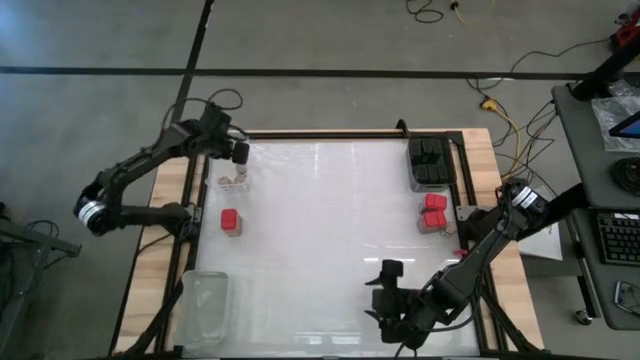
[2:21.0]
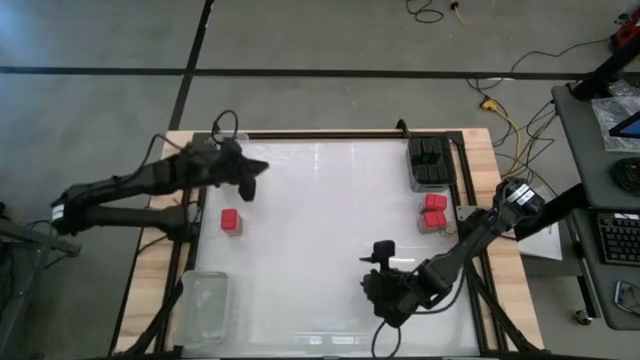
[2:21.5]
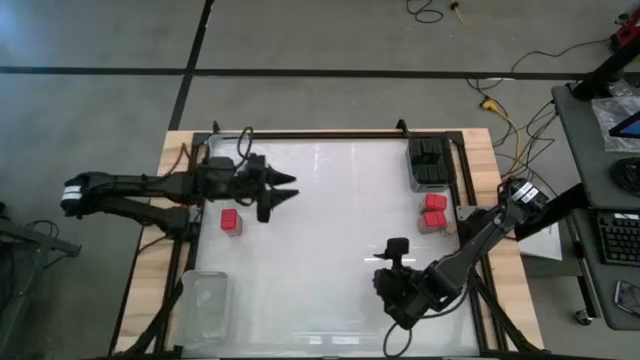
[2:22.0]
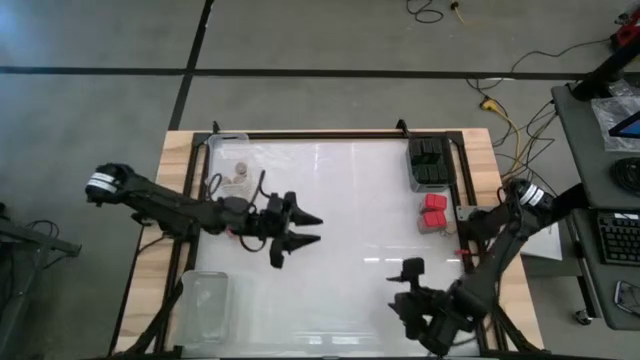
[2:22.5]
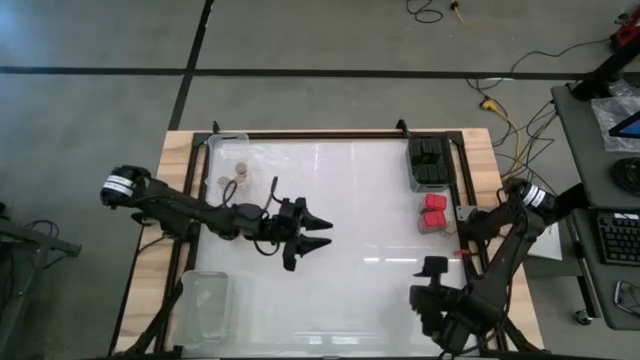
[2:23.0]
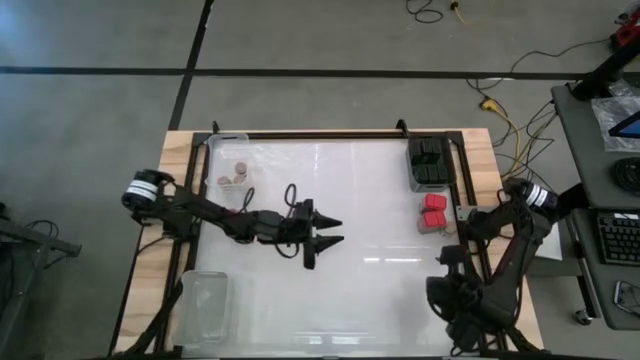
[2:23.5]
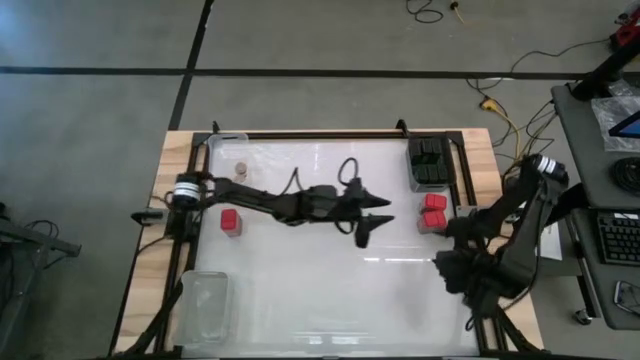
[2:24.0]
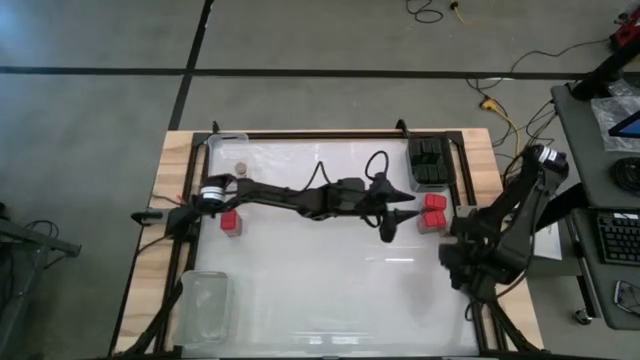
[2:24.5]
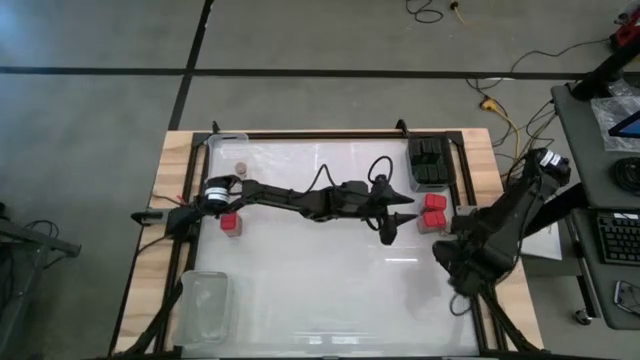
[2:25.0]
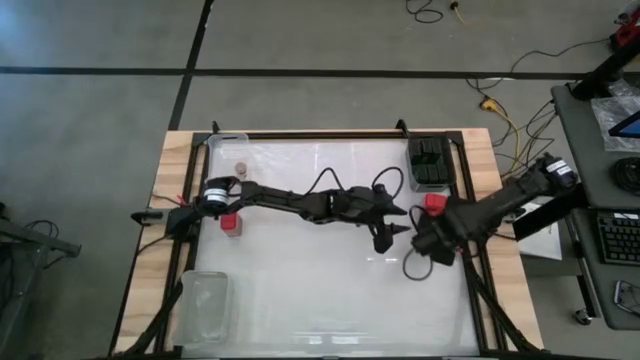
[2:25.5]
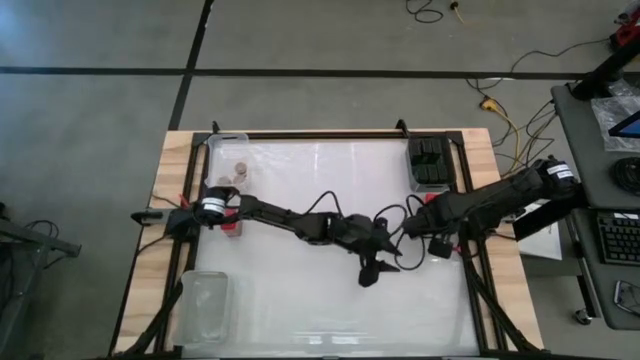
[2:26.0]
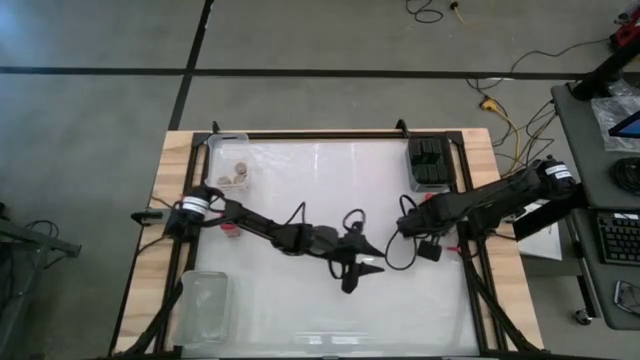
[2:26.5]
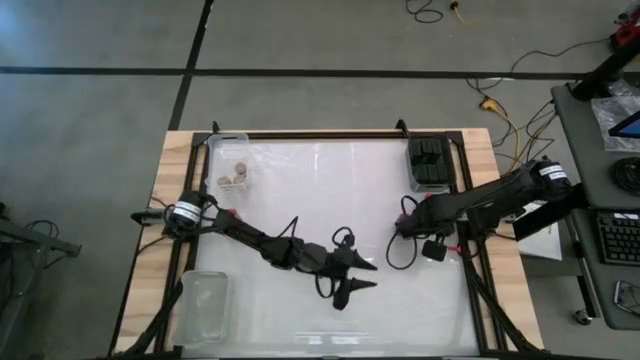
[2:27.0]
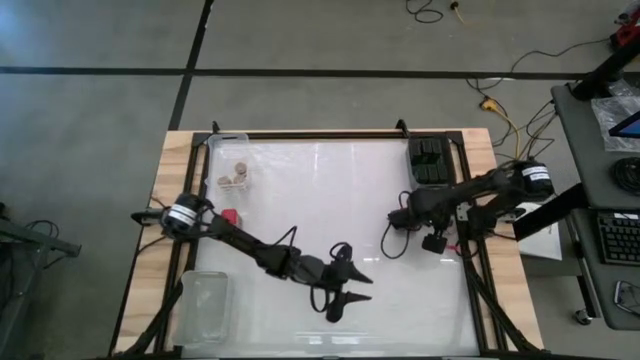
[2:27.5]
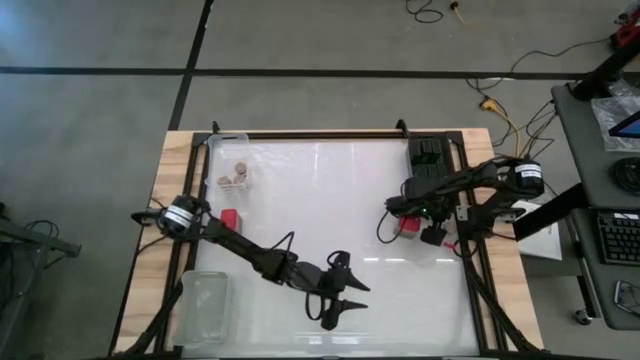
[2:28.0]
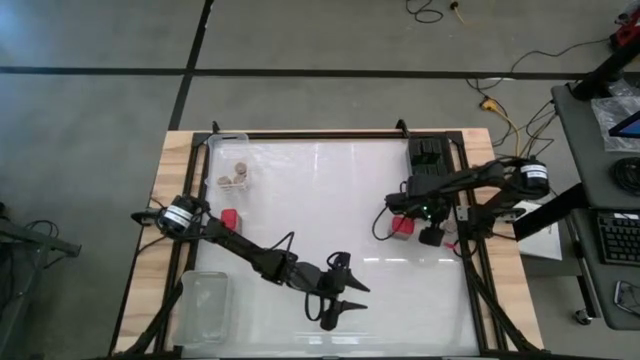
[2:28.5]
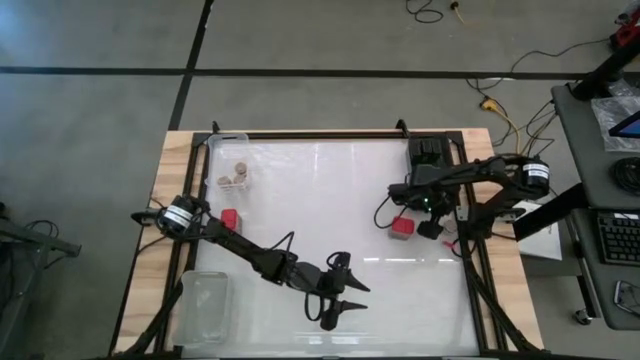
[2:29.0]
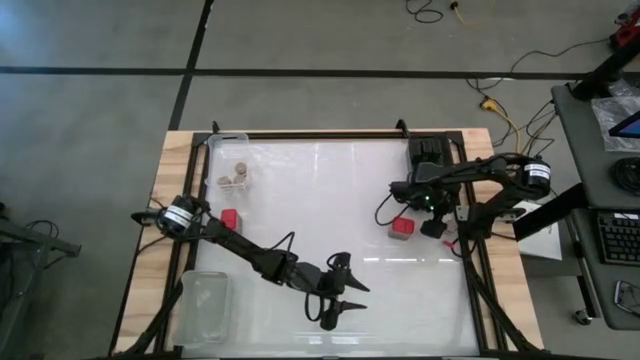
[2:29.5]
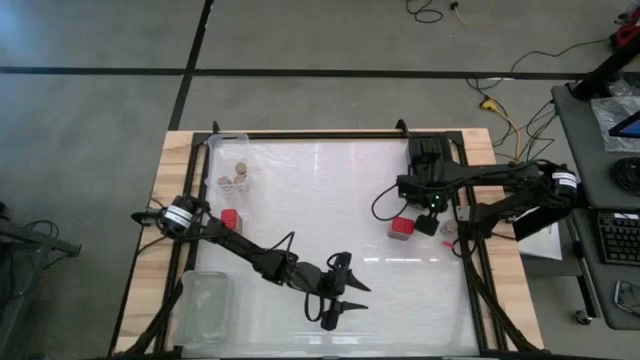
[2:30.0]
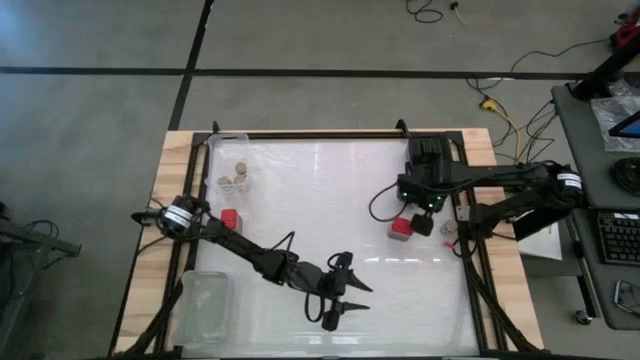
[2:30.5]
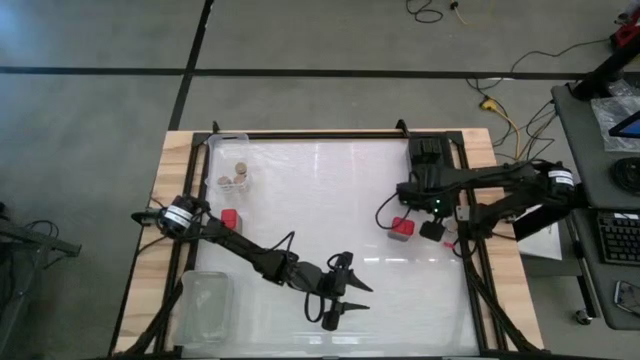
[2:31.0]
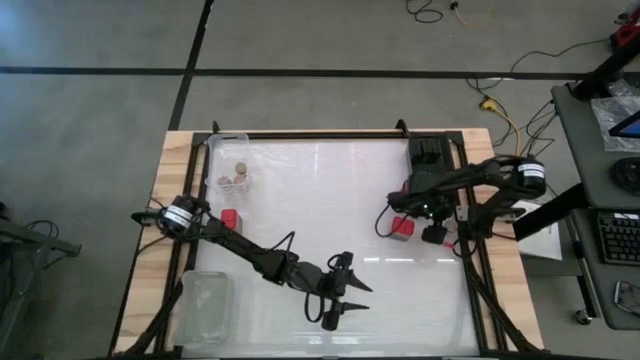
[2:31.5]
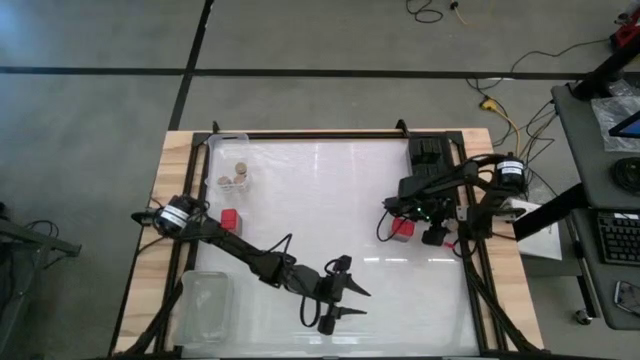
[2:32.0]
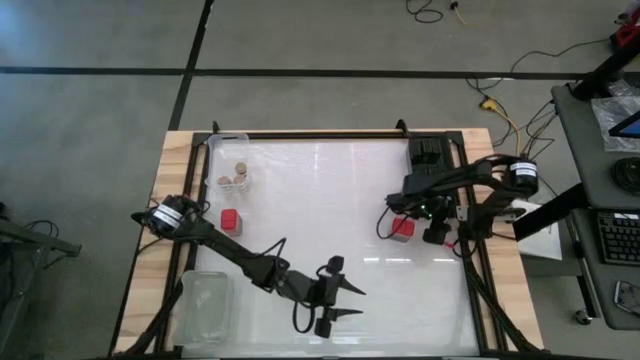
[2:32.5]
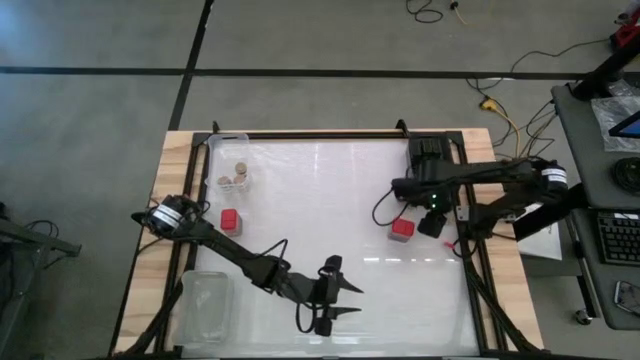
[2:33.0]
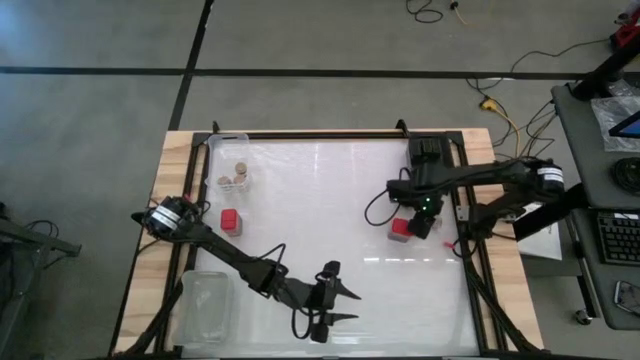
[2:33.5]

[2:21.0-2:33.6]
Task: Sort spices by type
Put the brown seasoning bottle into the transparent bin

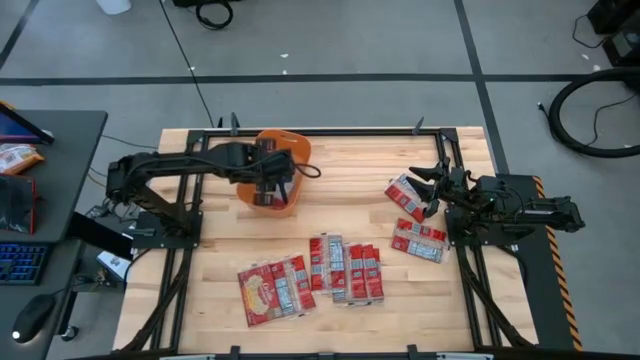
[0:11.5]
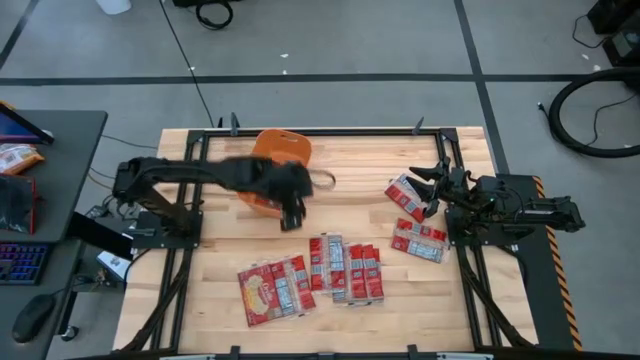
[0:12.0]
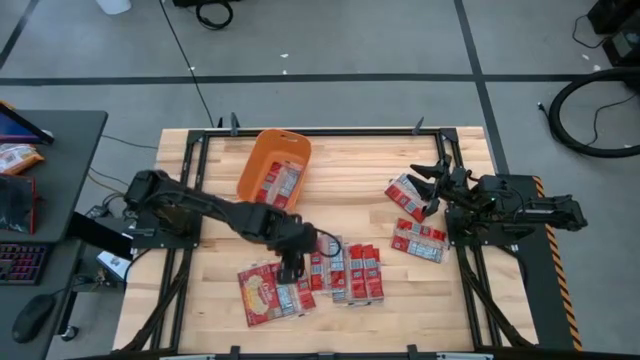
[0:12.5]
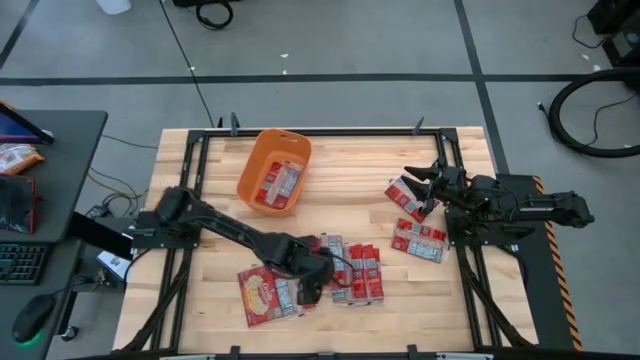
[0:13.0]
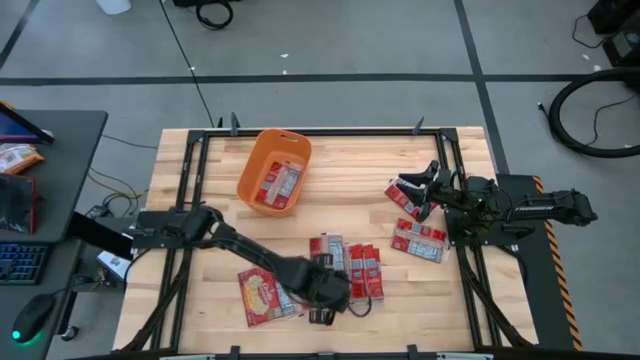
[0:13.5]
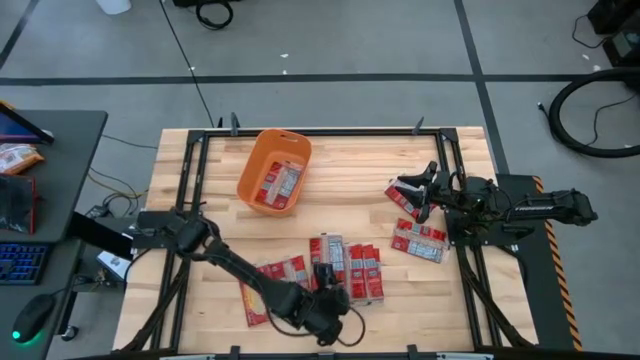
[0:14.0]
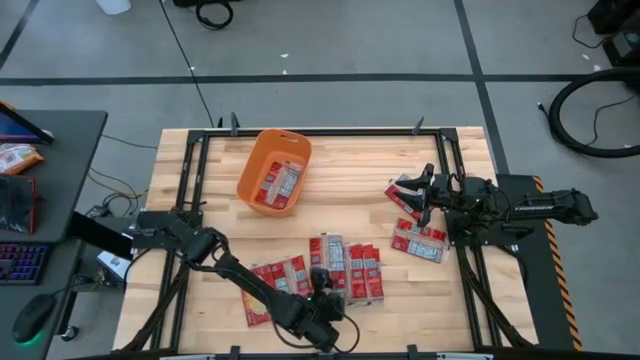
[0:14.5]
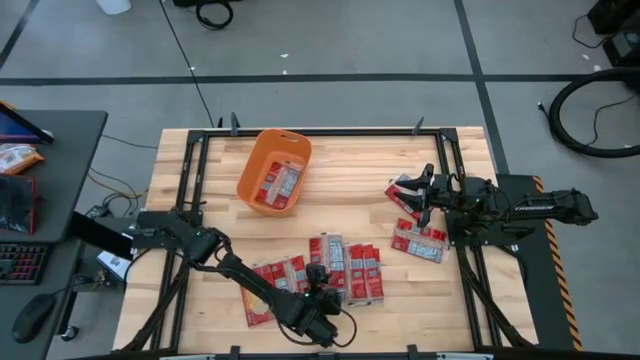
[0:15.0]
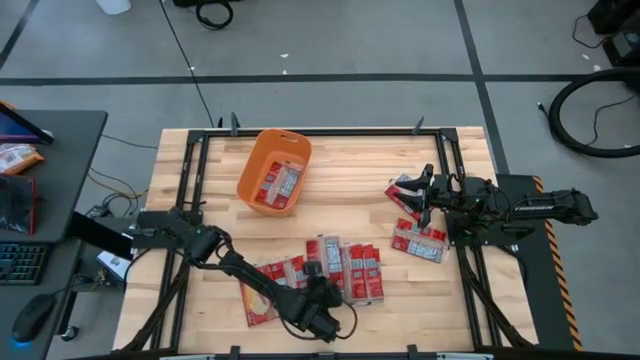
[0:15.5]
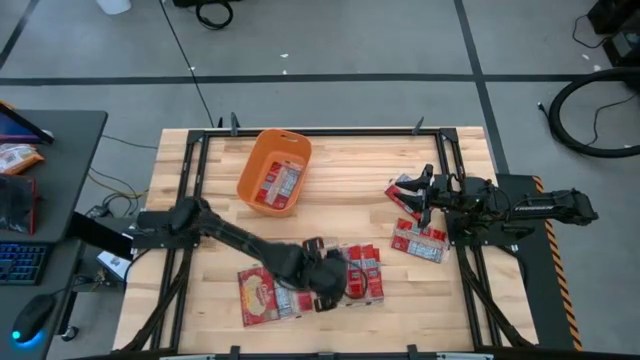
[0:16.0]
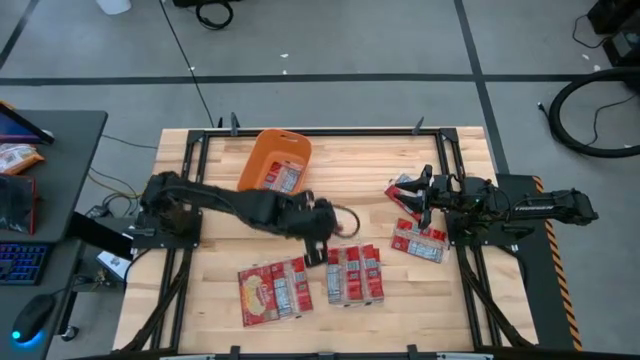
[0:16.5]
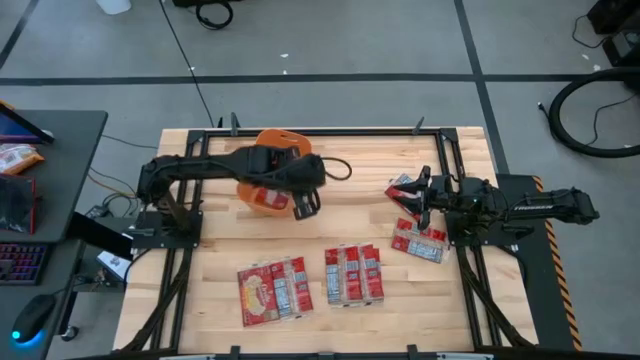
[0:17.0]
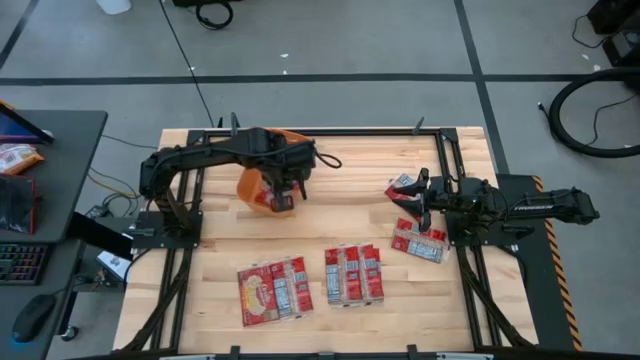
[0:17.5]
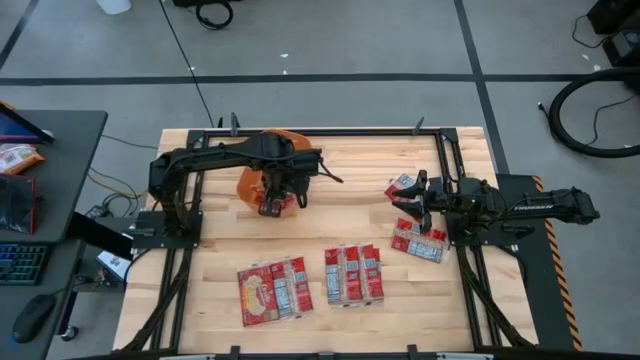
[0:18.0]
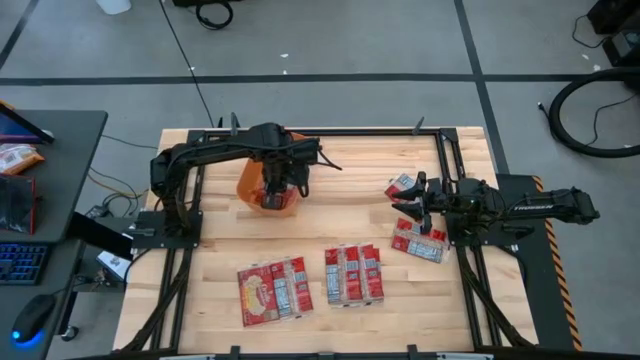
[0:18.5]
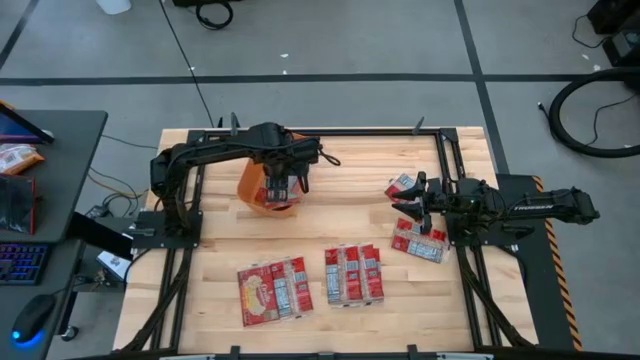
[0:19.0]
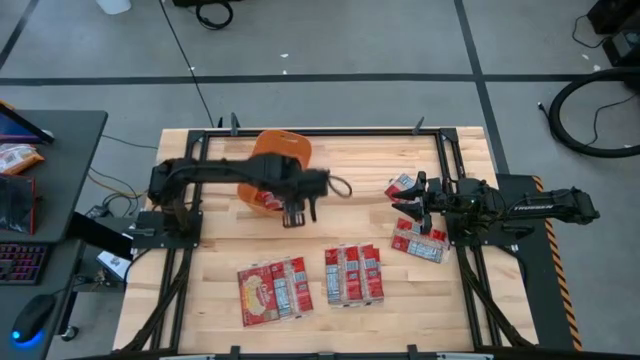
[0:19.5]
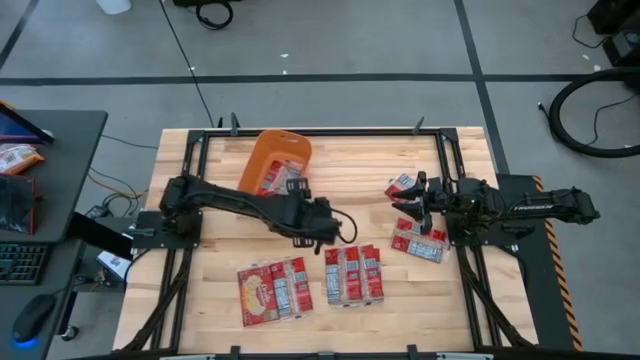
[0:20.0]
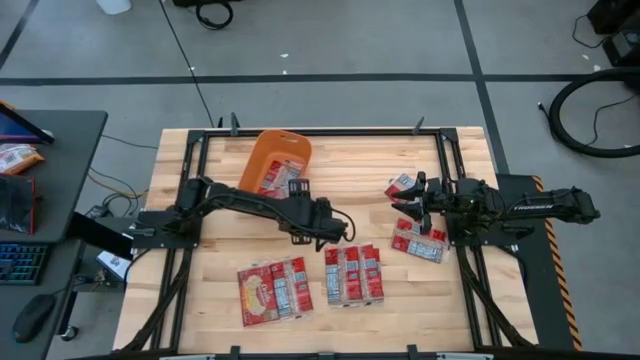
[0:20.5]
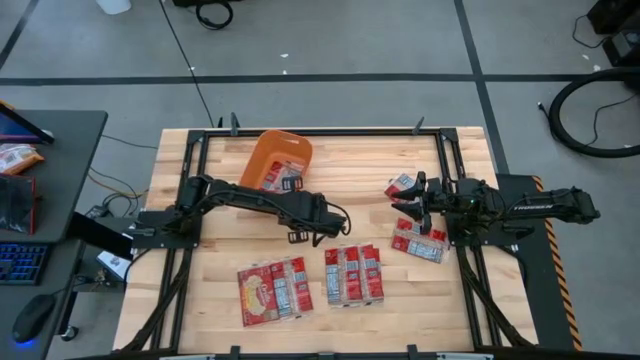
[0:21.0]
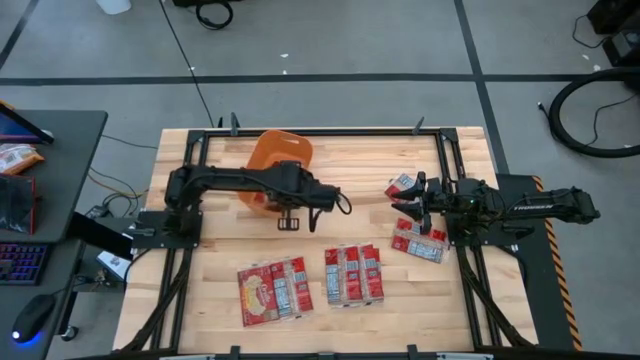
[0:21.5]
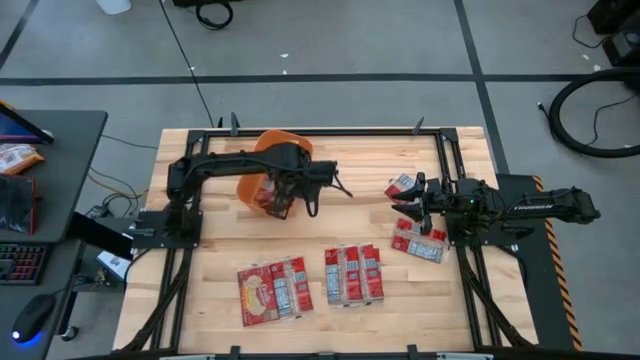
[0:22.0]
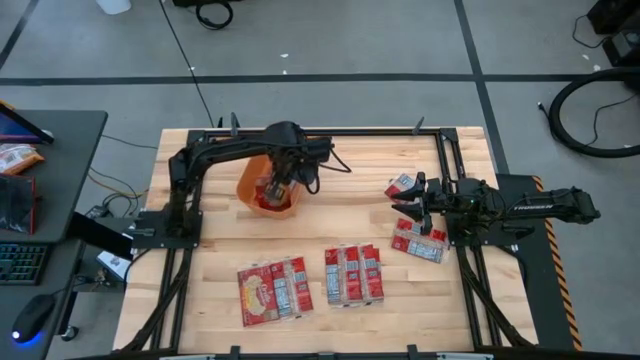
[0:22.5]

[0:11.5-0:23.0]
Task: Sort popcorn bags into baskets
Stack the popcorn pack on top of the other popcorn into the orange bin
